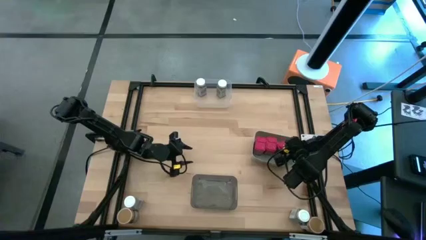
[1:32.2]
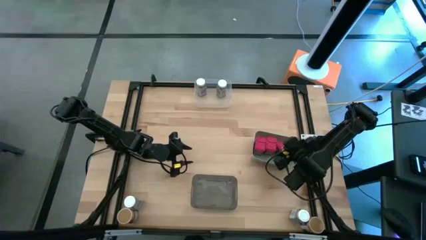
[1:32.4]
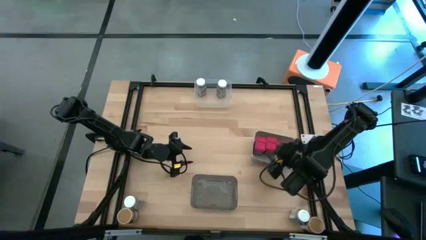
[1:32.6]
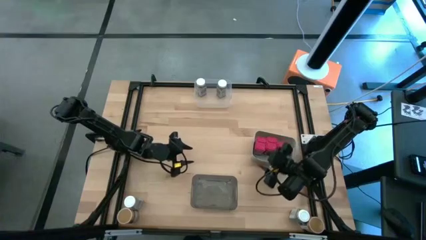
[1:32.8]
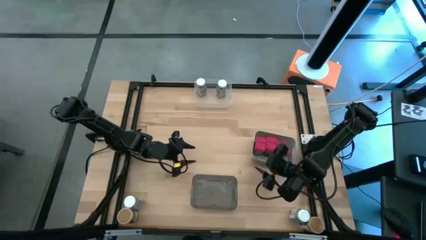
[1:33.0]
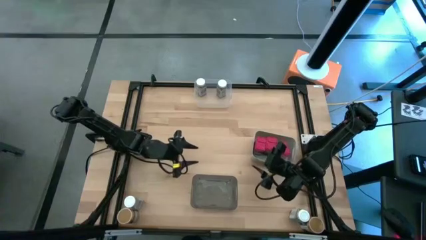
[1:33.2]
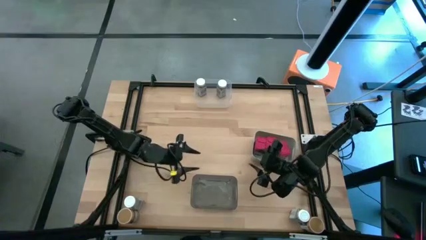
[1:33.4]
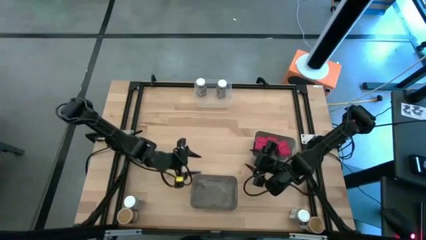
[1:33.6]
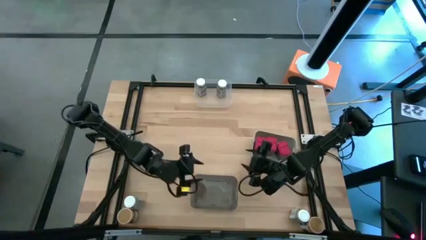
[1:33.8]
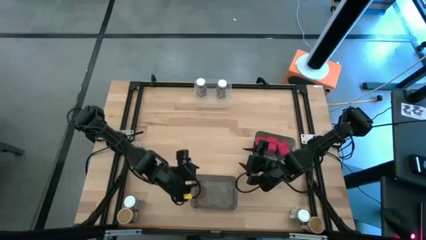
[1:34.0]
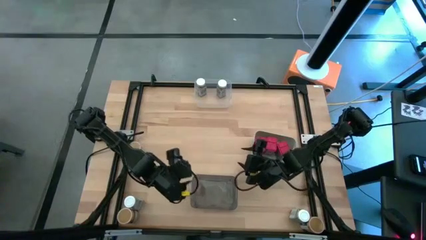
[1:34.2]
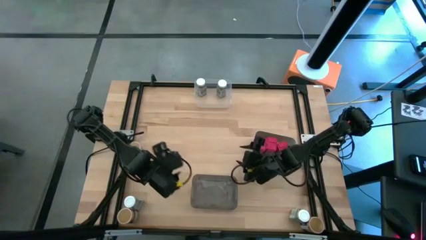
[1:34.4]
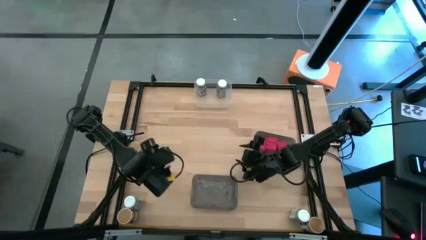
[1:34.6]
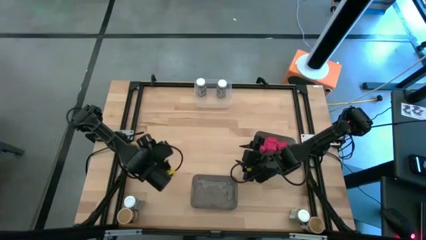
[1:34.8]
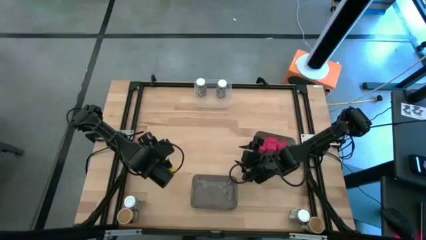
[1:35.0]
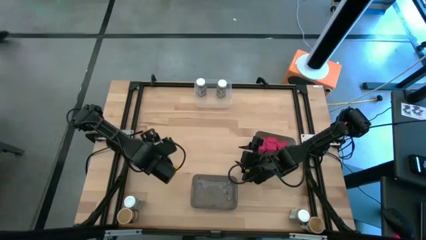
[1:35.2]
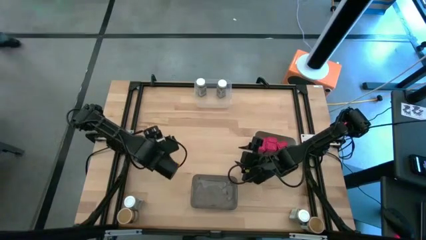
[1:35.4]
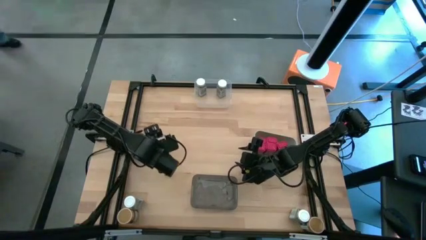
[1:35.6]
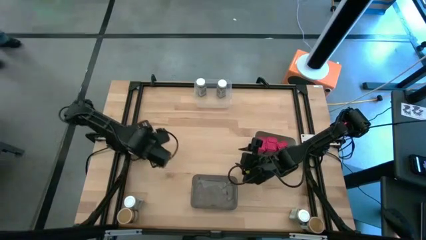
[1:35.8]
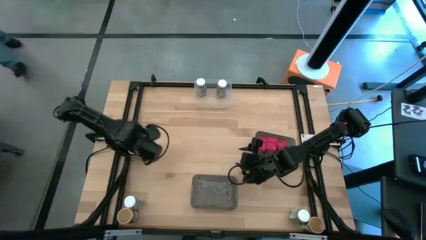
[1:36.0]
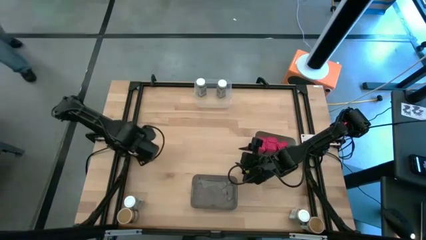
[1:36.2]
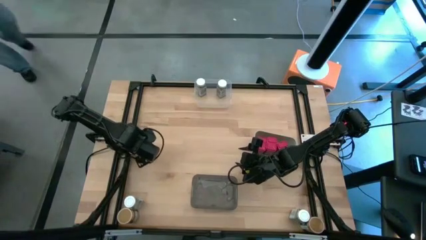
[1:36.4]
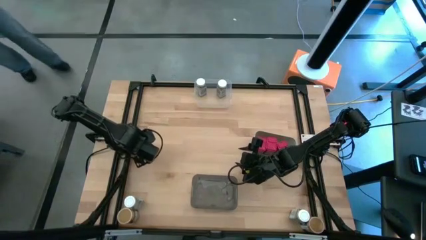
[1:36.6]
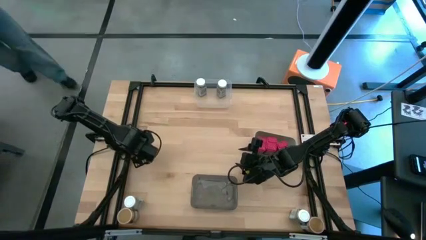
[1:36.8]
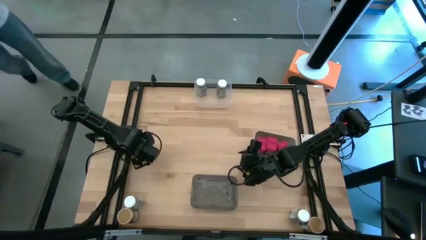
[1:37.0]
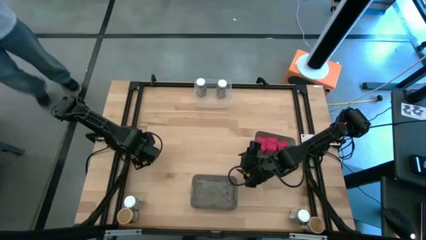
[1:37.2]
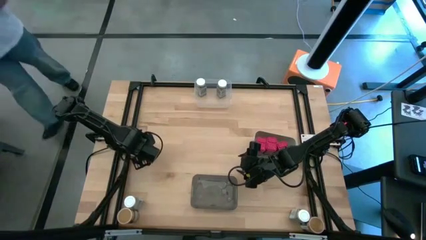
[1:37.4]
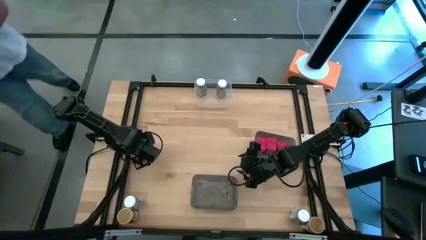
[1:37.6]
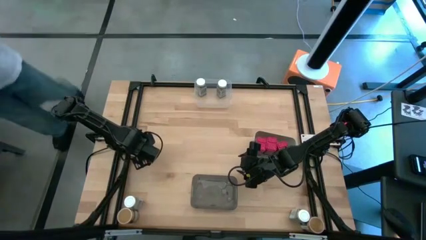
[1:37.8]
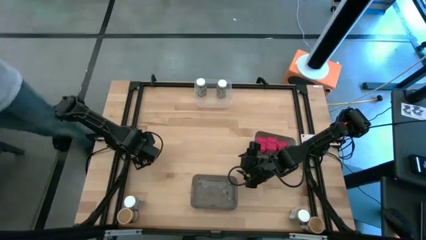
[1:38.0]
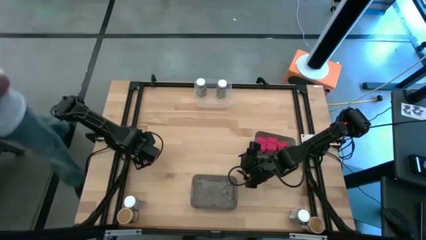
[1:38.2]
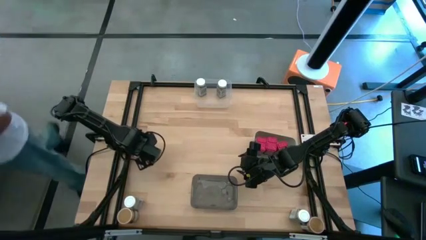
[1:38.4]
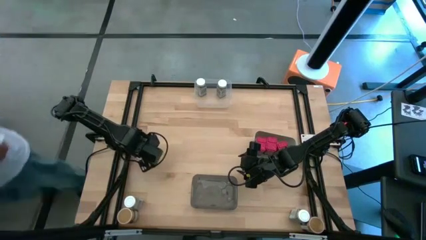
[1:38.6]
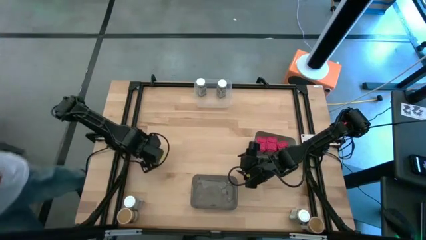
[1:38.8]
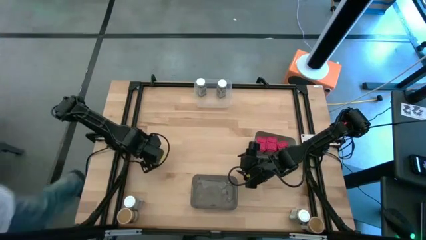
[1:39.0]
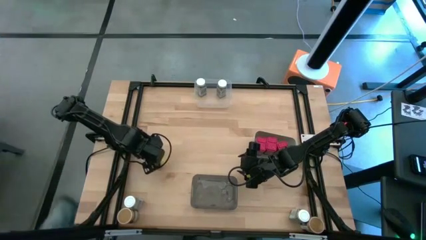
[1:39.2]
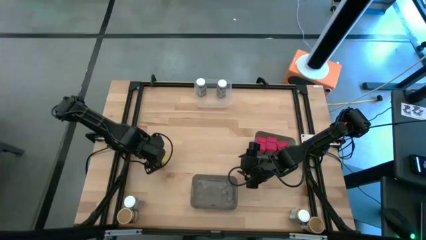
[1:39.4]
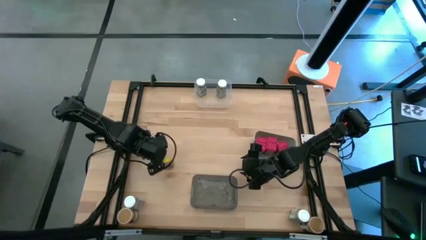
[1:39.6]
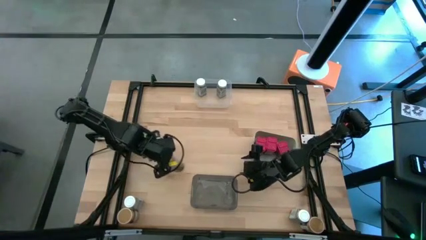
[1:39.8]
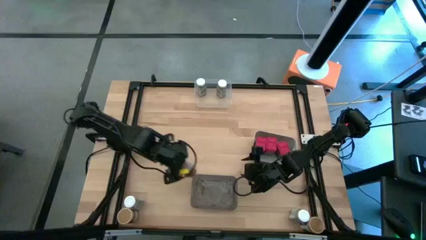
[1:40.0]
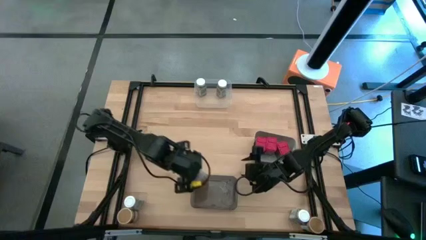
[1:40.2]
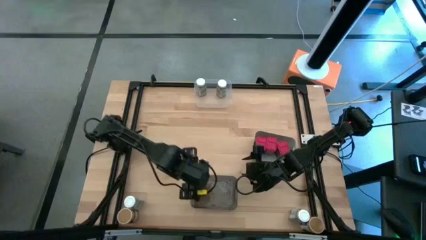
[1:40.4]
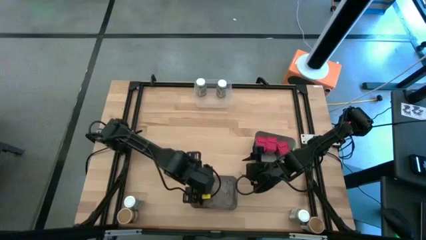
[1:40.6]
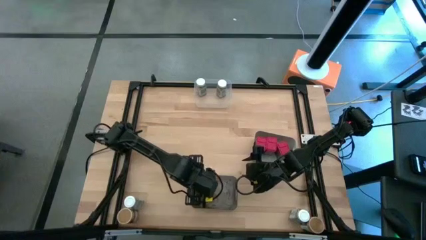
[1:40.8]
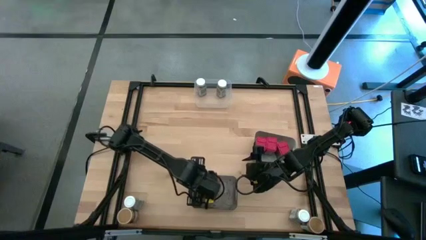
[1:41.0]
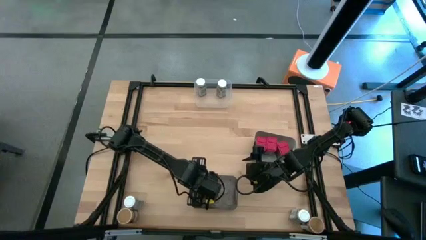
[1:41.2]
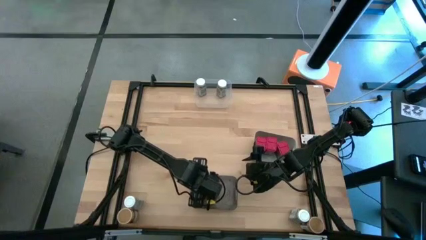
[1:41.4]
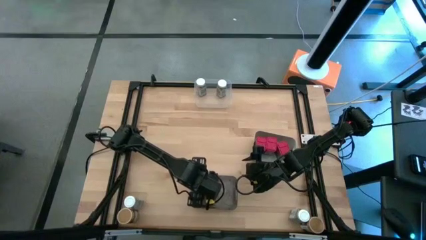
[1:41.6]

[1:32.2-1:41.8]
Task: Sort spices by type
Put the gold seasoning bottle into the black bin

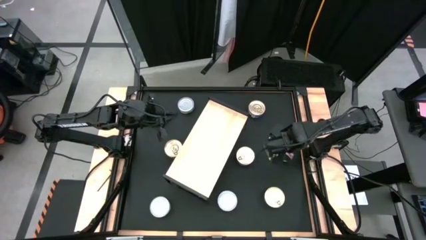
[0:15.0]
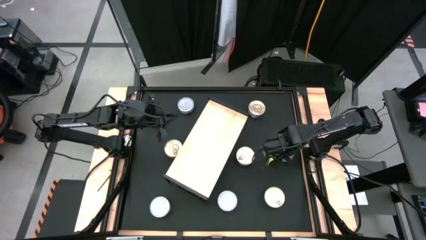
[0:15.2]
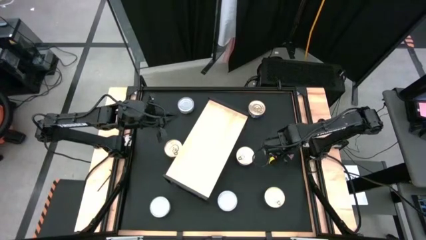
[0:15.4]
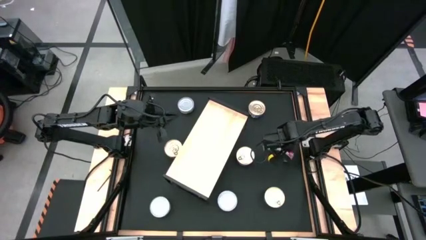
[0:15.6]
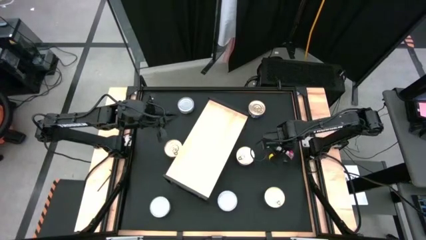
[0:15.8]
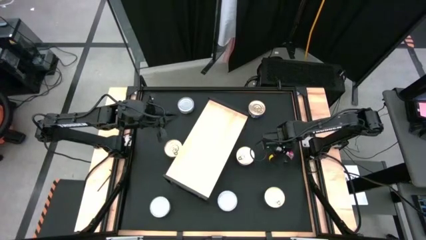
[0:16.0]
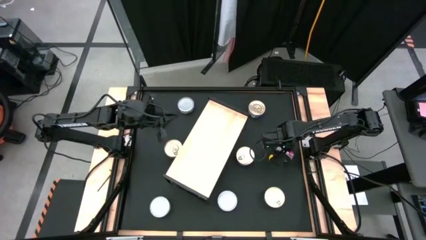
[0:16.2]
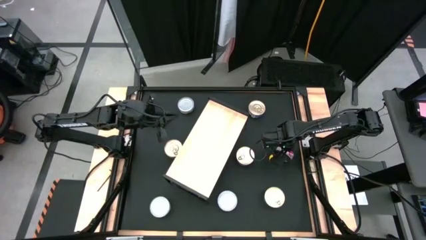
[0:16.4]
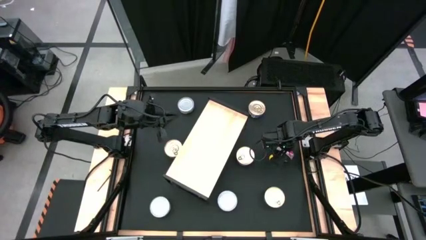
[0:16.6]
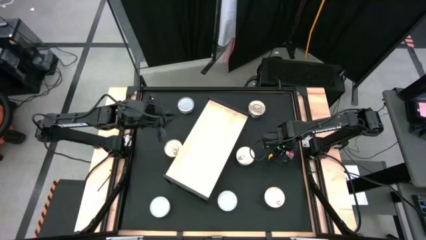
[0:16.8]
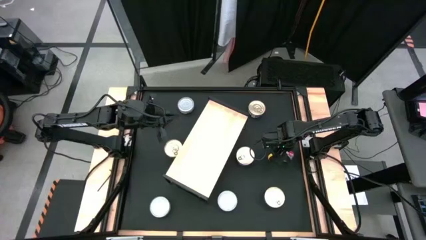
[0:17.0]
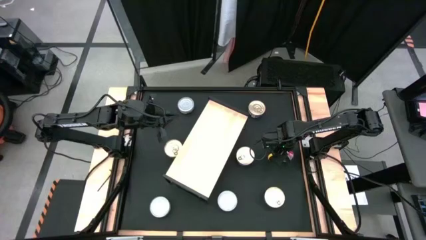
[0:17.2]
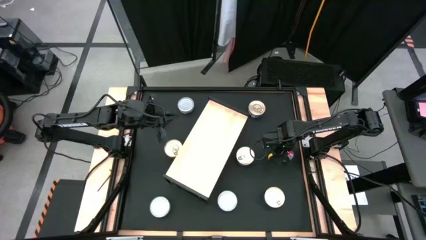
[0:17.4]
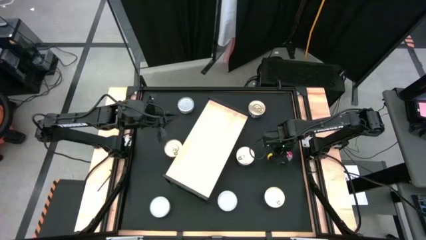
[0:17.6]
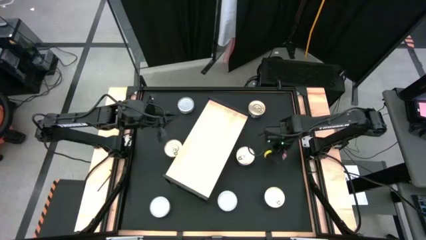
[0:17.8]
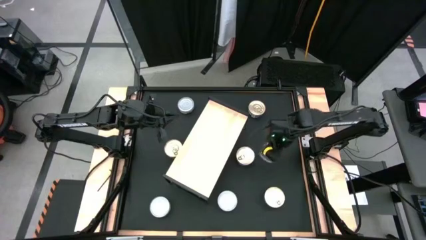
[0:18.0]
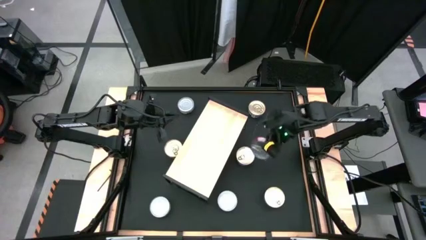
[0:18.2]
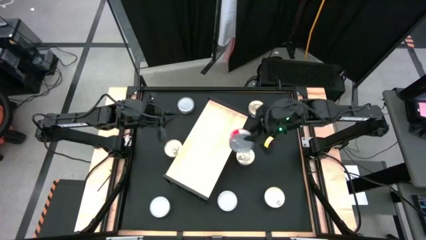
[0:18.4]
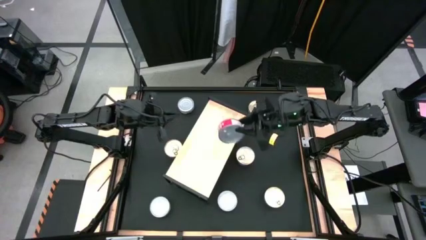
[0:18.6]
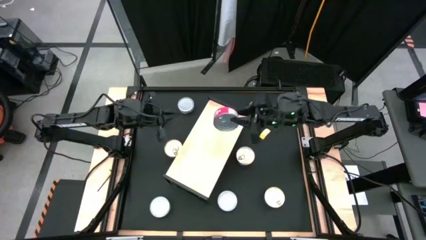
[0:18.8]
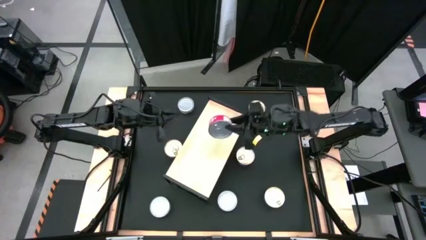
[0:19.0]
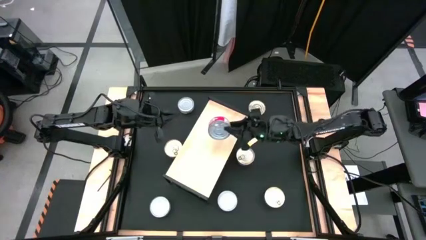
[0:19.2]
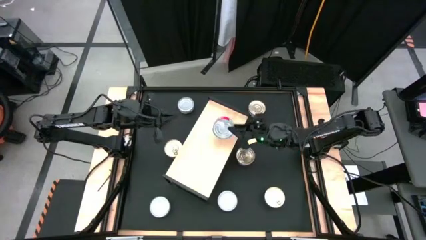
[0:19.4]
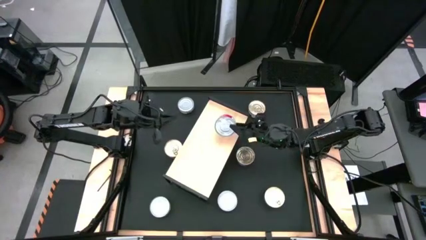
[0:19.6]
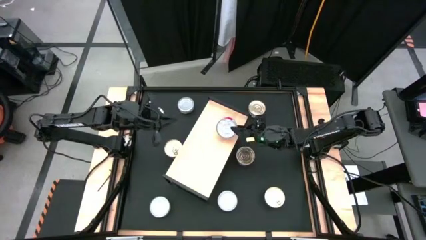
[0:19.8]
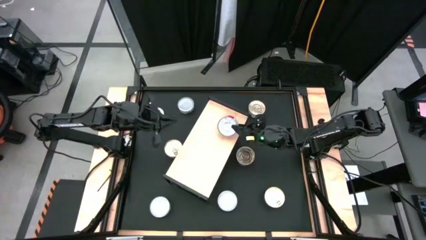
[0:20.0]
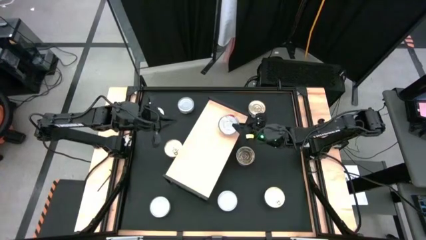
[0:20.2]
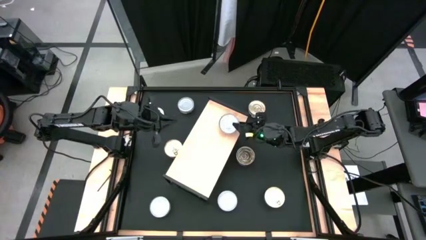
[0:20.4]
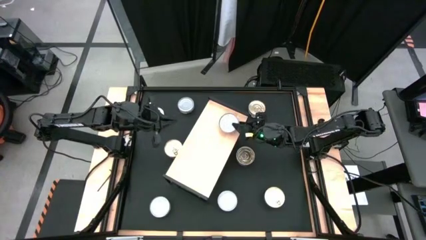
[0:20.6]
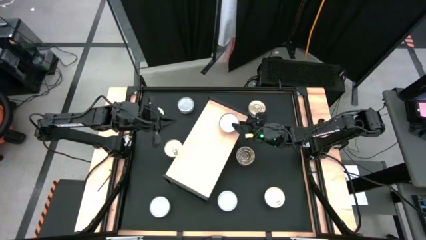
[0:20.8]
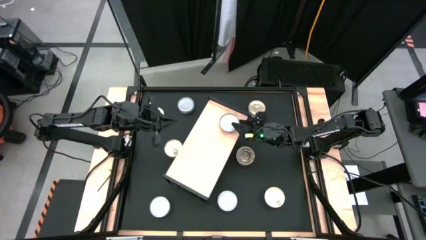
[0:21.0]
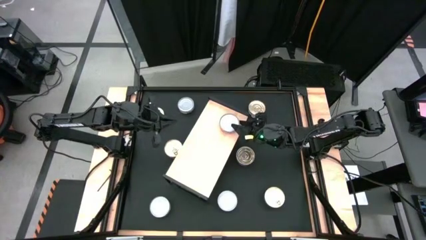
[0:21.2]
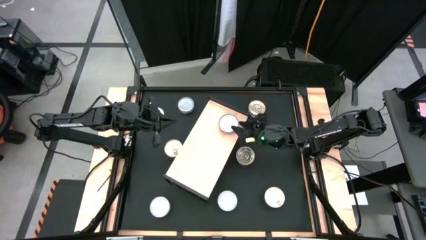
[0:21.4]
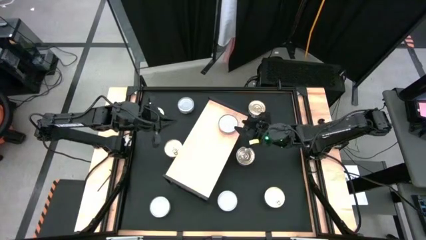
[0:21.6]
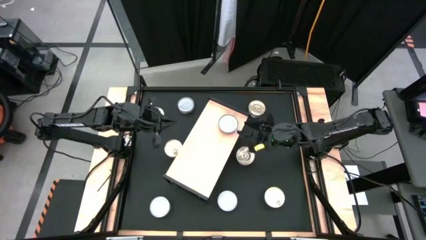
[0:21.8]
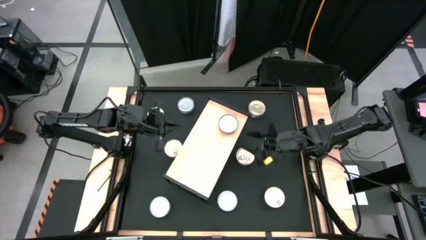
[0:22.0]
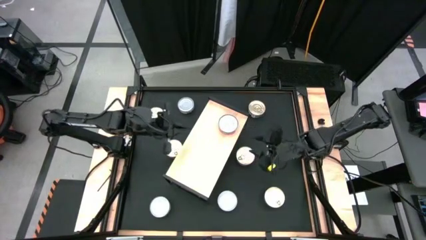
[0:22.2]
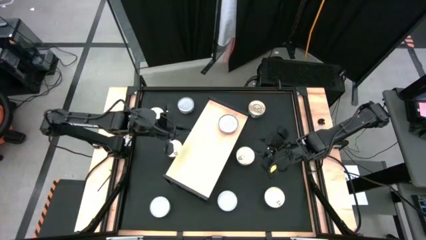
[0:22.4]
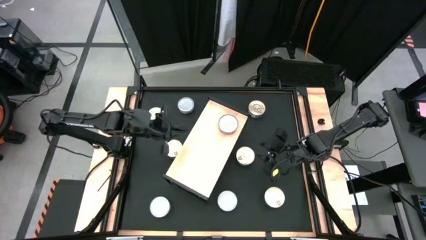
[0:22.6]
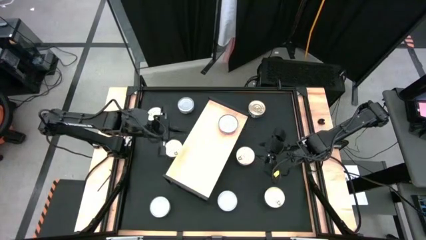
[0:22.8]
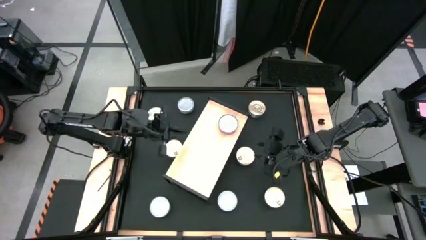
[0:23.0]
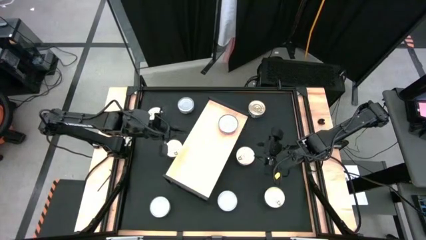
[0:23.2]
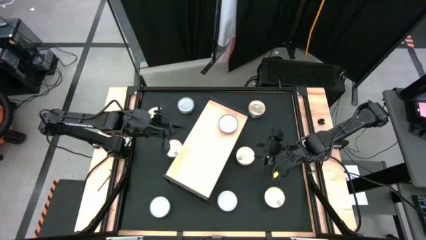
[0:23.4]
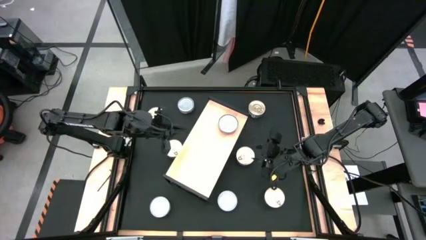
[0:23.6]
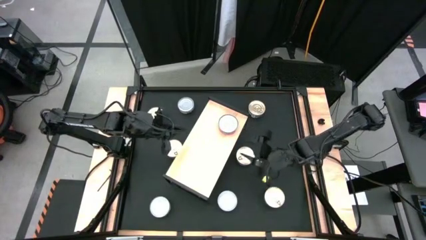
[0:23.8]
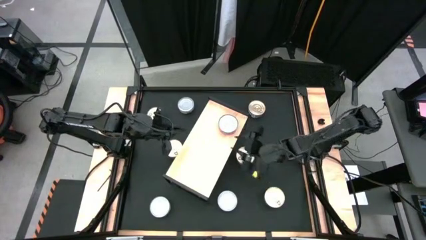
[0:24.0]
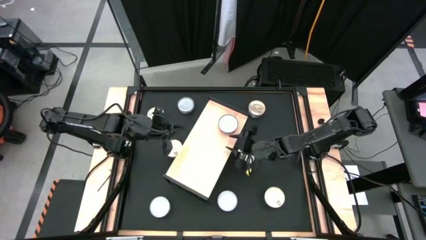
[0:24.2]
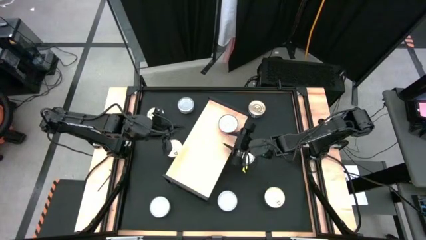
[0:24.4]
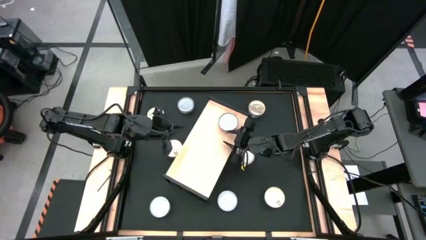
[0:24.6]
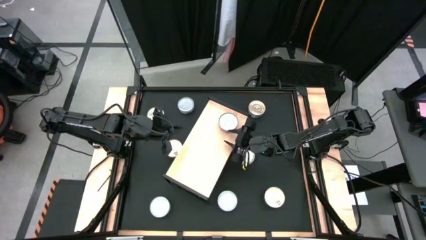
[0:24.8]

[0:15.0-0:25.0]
Task: Stack canned seafood by type on shelf
Put the red tuna can on the shelf
